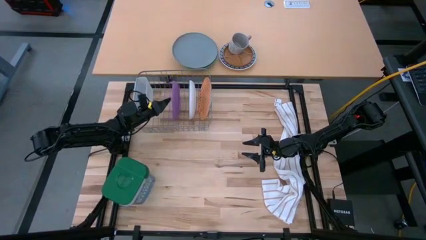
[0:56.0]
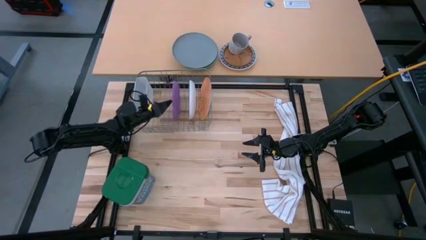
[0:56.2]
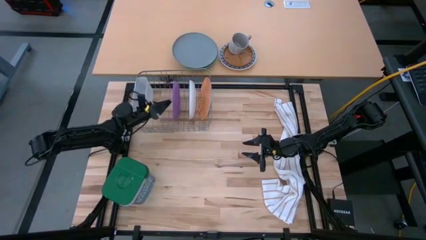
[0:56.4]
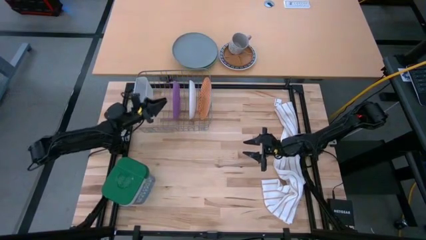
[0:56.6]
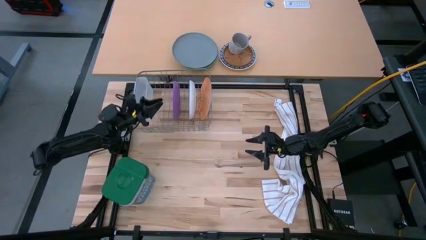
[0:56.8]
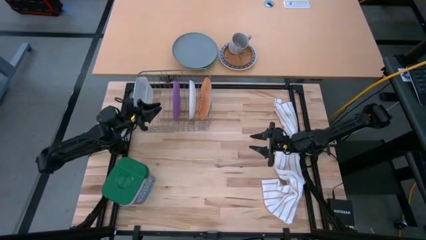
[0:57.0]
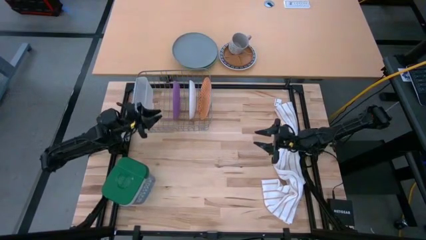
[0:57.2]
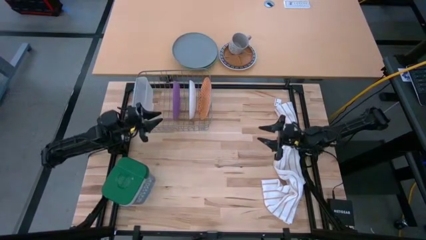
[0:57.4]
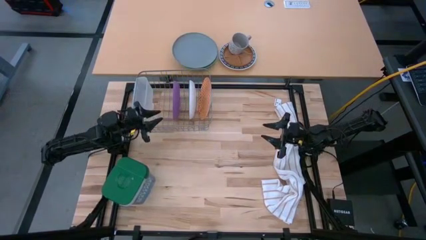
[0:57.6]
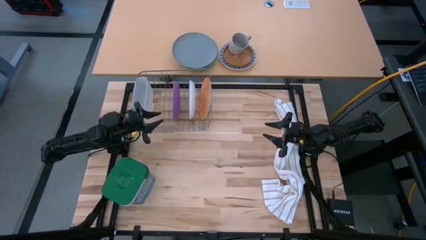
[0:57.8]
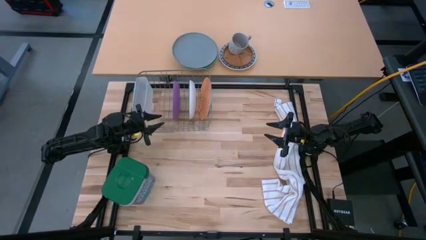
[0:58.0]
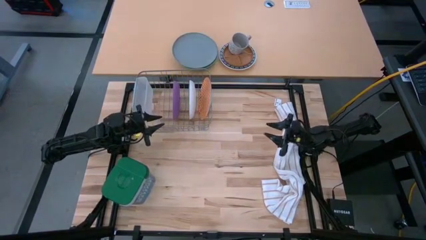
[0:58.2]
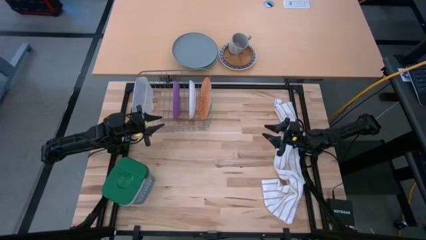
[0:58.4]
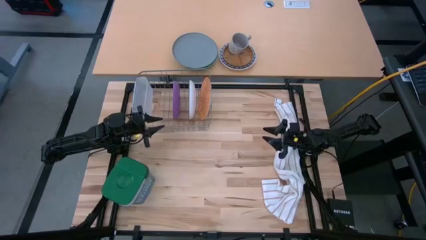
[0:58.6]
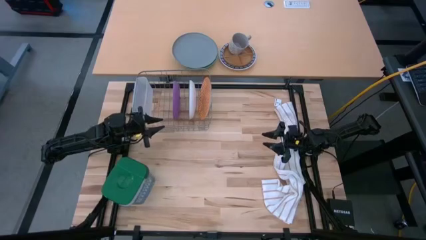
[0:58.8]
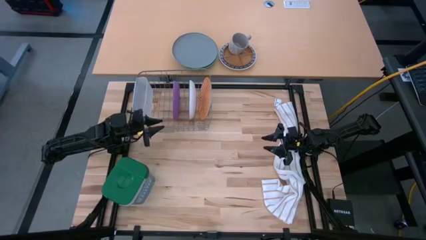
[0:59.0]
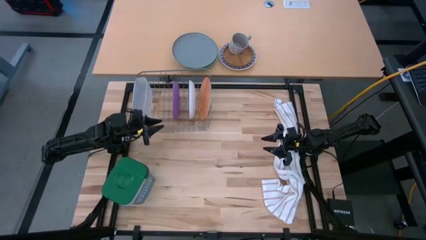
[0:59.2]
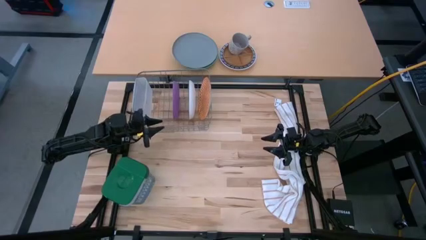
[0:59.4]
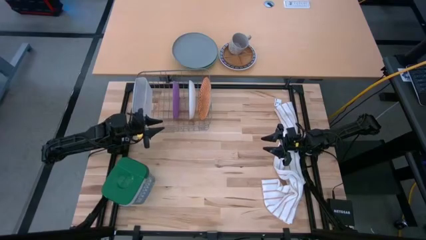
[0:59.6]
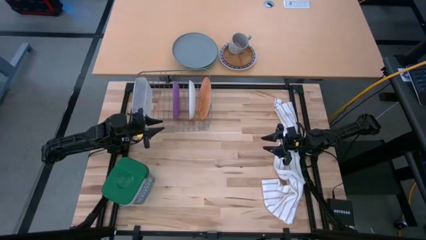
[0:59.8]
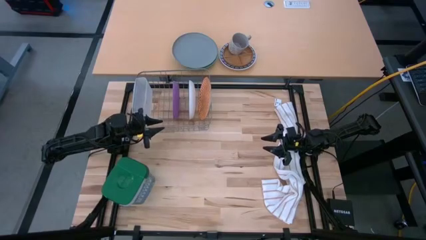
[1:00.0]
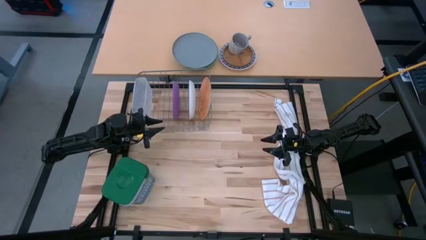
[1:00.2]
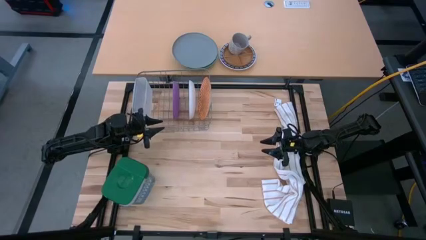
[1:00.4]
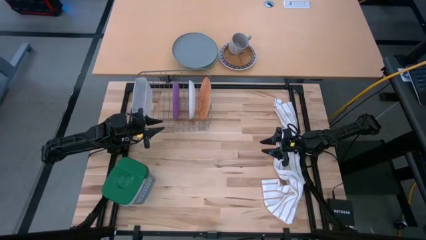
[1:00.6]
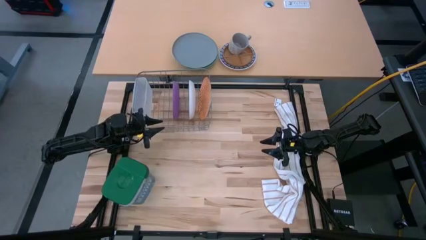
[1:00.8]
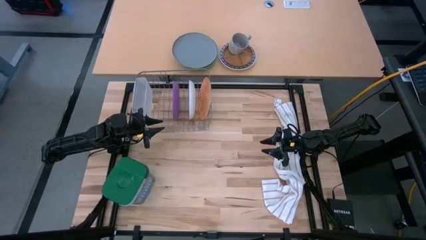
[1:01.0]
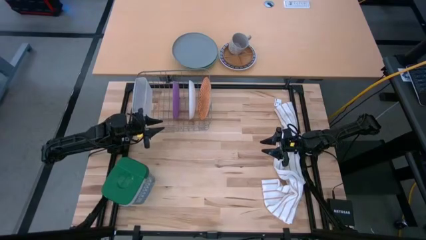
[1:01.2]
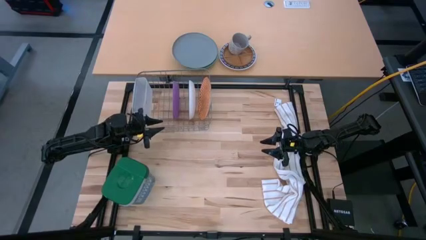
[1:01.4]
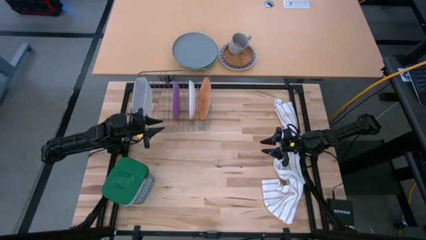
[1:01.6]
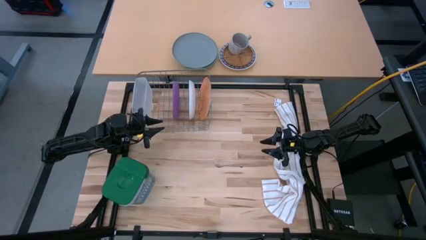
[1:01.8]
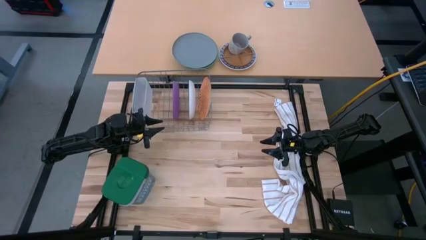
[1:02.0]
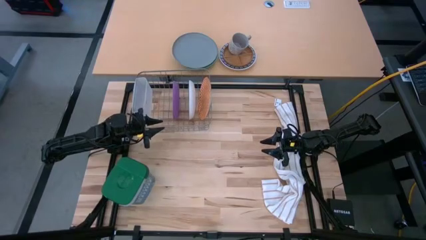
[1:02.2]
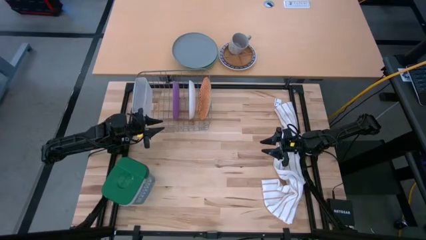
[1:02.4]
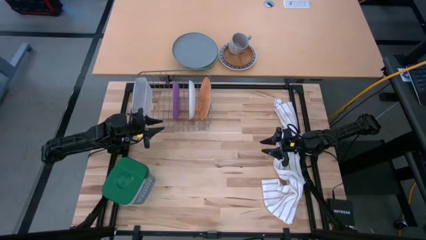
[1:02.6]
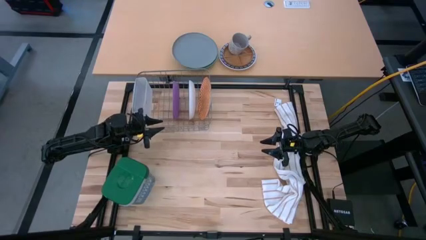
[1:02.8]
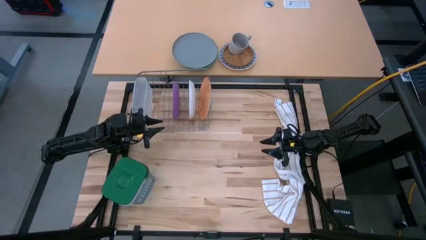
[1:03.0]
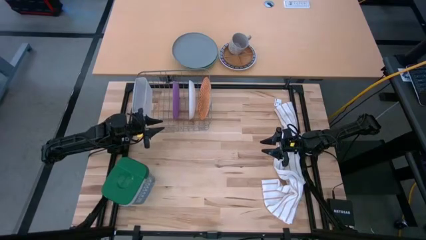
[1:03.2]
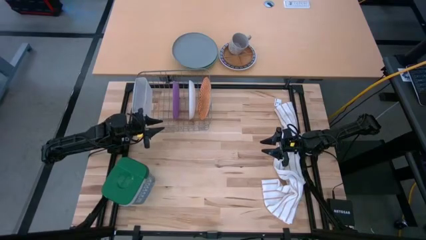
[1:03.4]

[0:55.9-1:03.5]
Task: Sort dishes
Return to Home Position

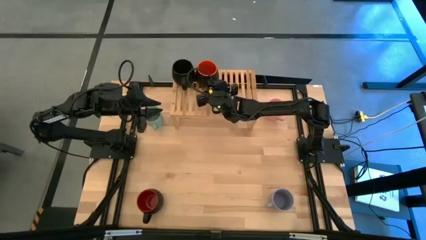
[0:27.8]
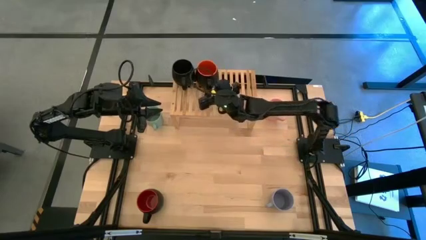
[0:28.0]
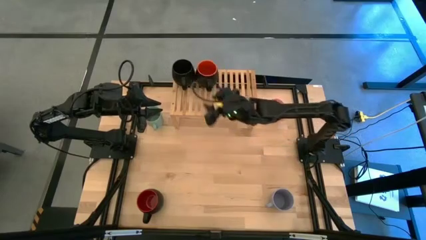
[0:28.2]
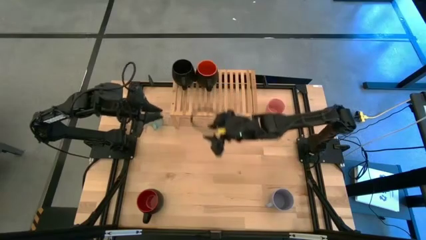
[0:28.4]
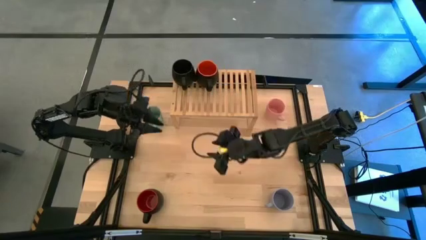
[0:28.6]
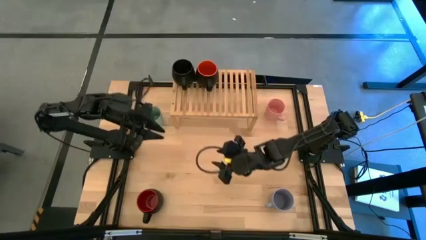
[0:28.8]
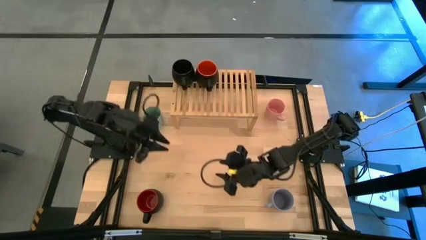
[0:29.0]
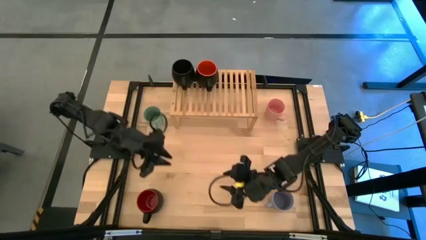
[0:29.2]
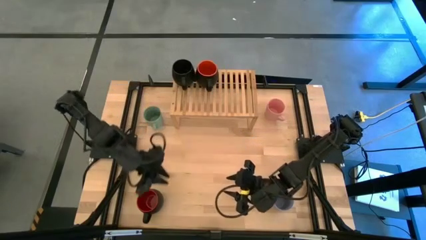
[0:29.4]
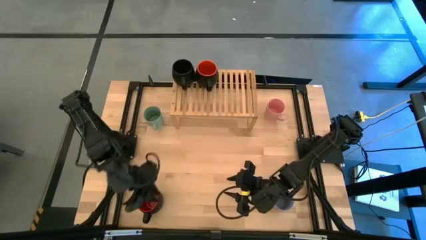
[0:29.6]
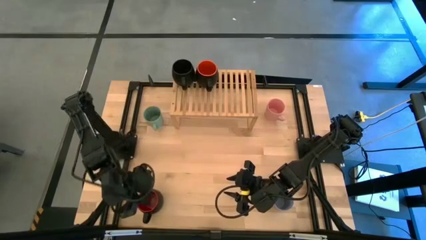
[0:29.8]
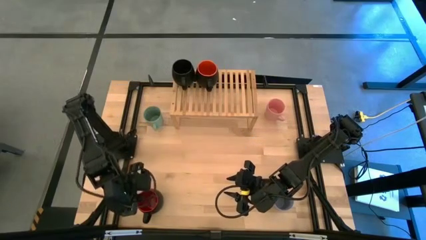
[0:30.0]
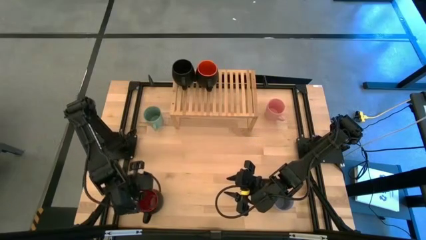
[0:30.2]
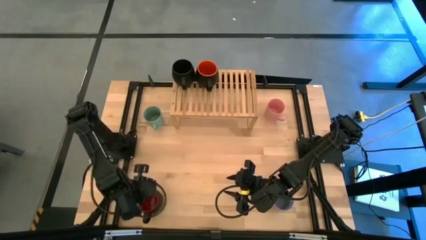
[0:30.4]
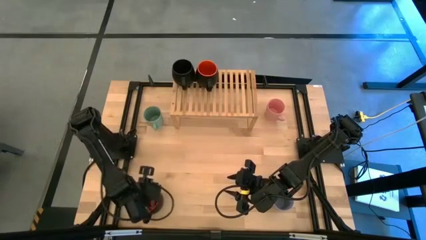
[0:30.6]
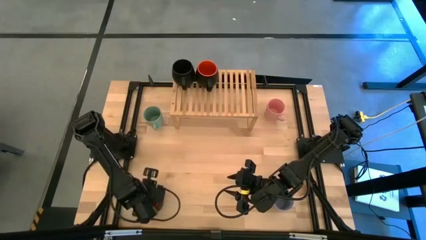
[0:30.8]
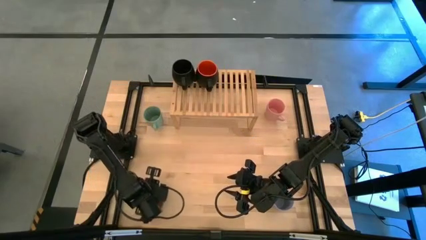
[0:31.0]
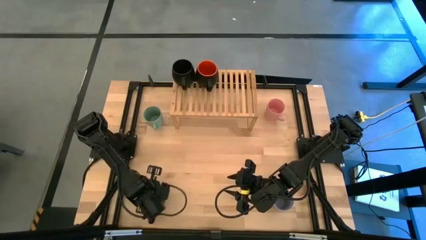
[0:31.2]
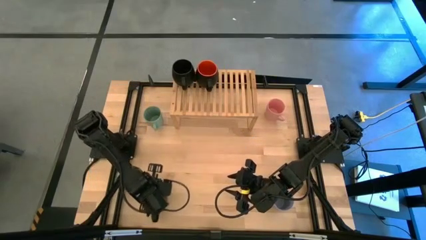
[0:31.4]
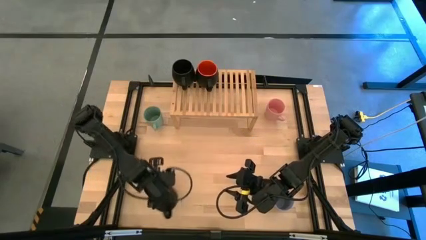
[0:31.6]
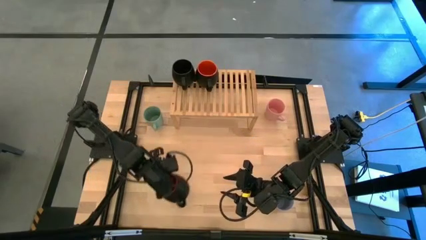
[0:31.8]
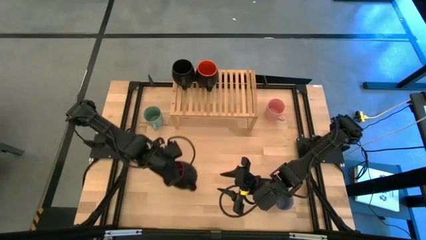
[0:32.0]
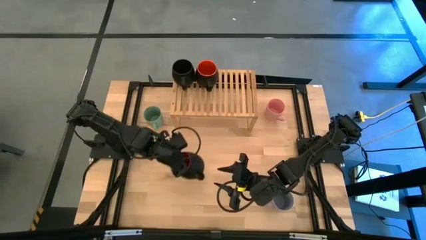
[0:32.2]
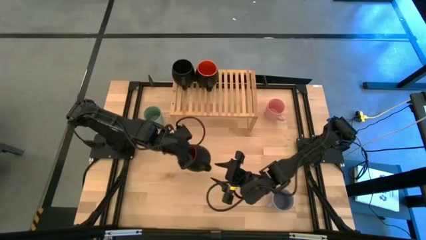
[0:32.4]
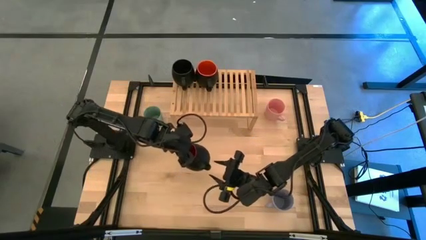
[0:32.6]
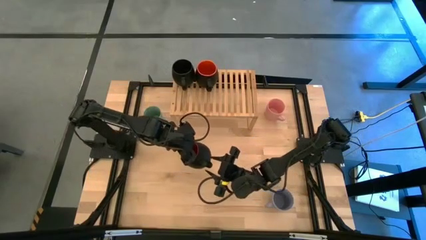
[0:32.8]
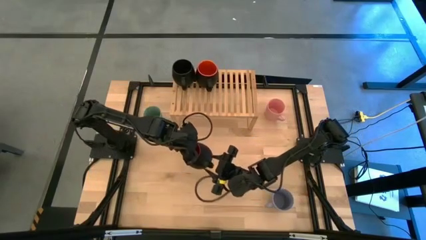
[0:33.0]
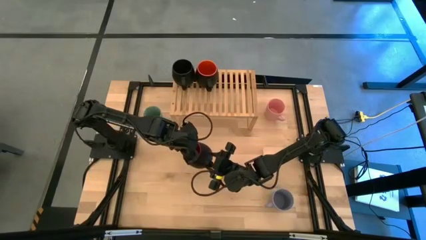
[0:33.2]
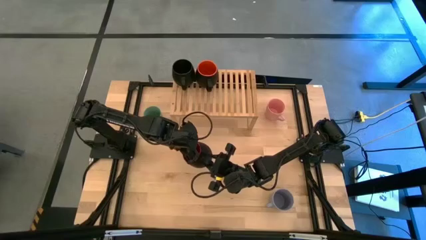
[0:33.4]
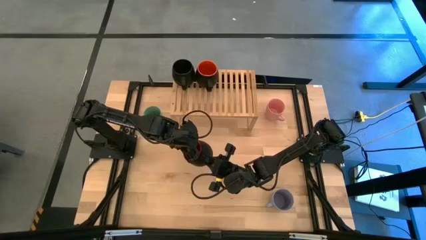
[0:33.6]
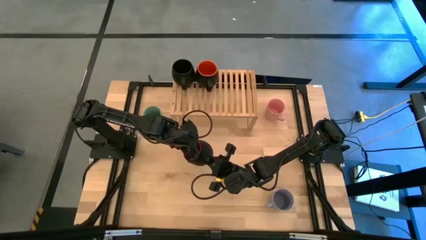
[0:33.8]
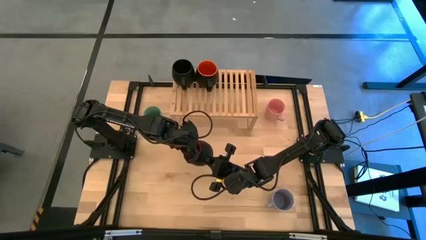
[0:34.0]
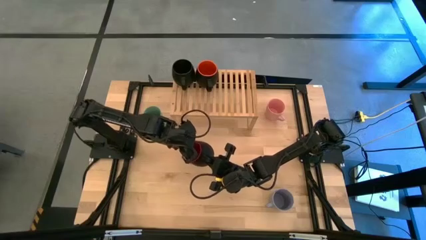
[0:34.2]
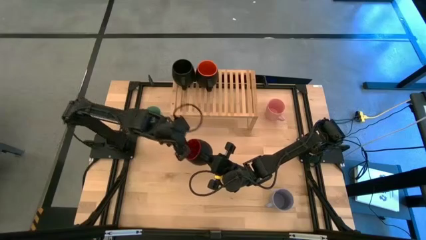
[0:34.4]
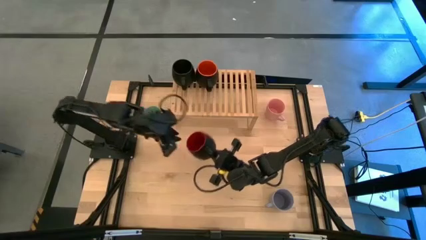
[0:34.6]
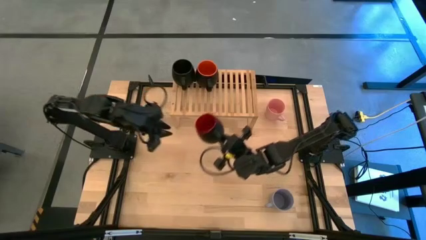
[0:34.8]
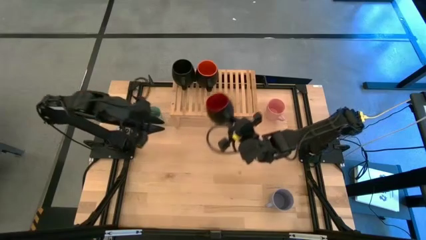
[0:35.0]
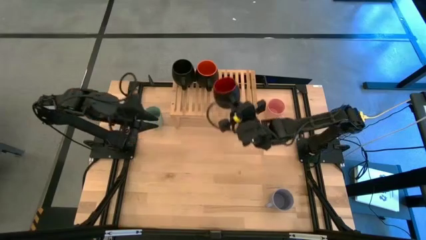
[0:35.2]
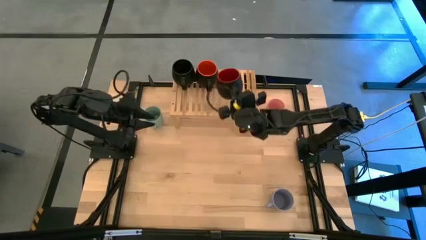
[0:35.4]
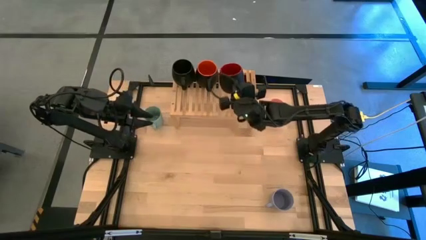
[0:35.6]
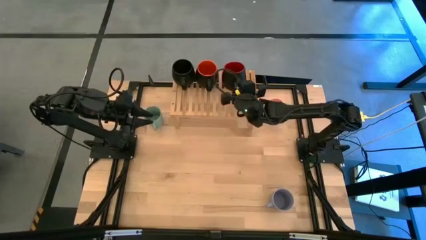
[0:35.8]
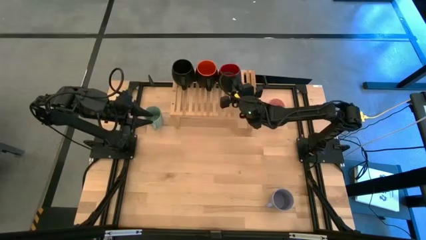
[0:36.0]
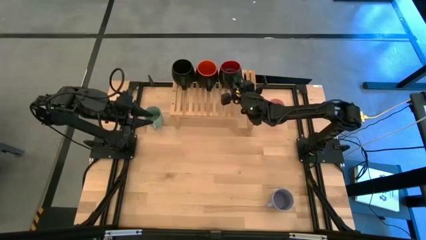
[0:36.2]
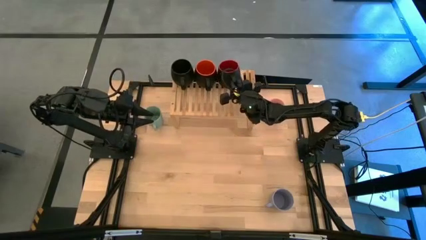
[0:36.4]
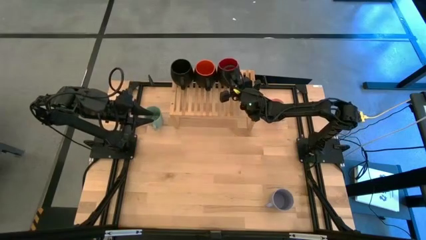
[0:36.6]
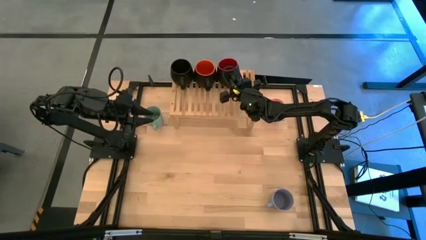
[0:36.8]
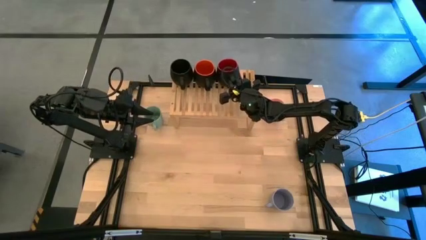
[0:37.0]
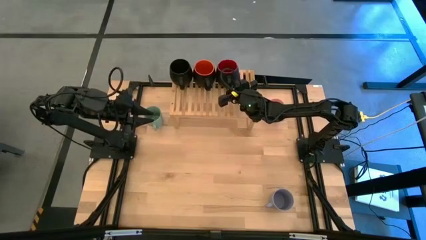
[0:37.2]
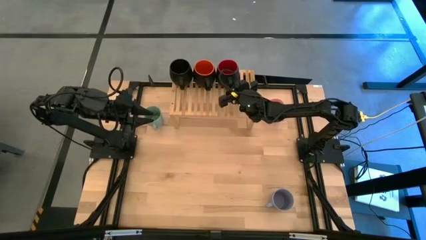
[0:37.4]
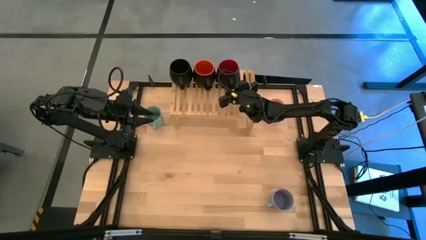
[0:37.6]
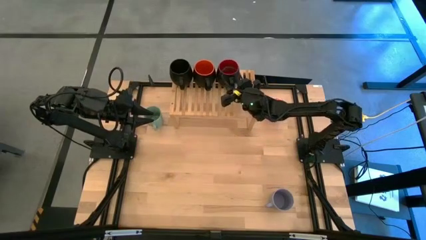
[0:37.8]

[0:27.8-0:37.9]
Task: Place coffee mugs
Put the red mug on the shelf
